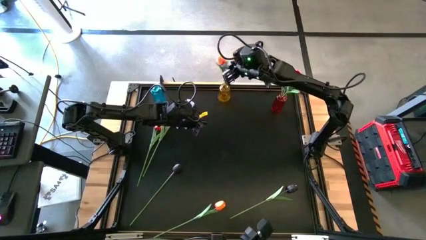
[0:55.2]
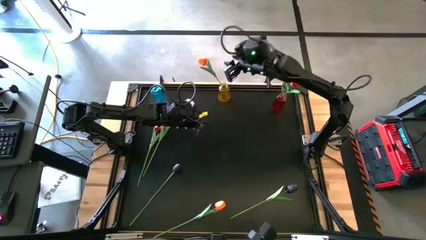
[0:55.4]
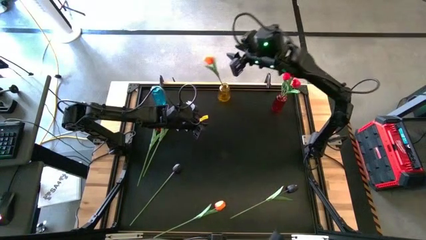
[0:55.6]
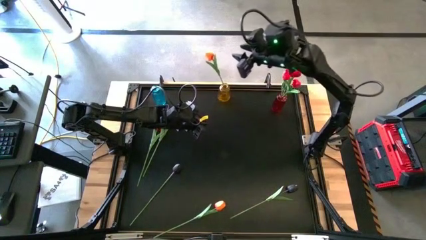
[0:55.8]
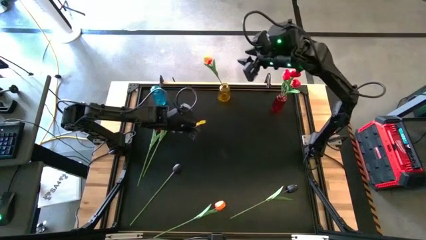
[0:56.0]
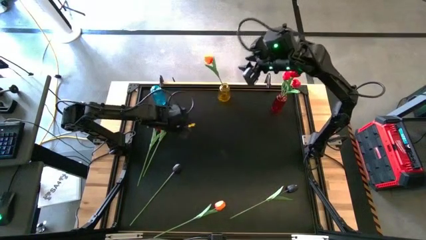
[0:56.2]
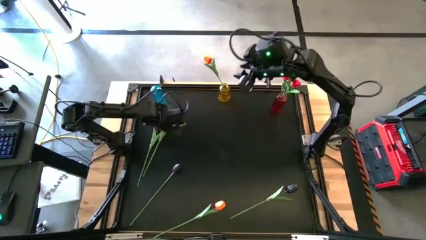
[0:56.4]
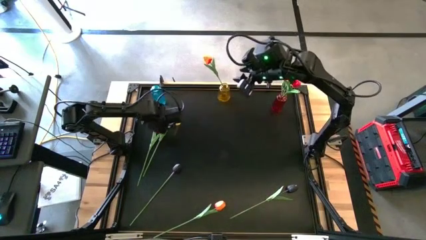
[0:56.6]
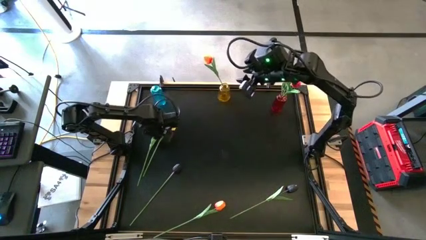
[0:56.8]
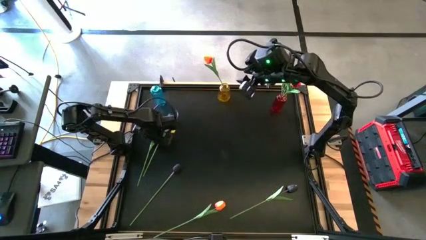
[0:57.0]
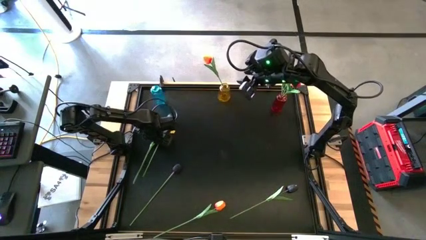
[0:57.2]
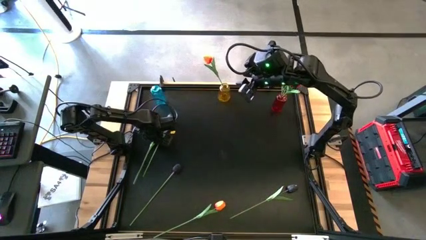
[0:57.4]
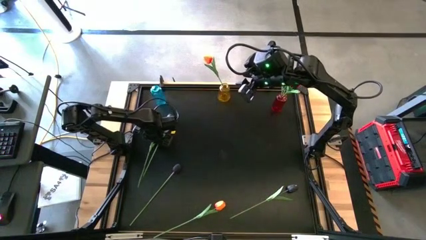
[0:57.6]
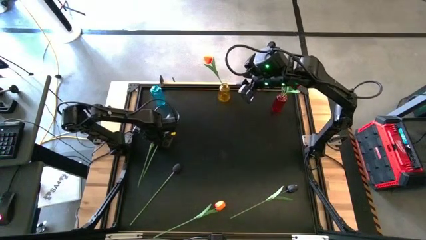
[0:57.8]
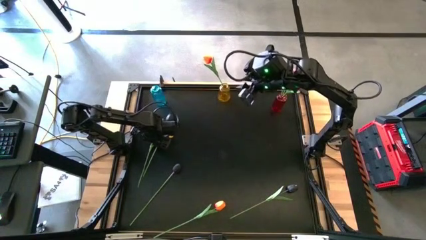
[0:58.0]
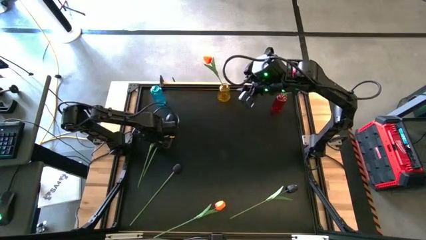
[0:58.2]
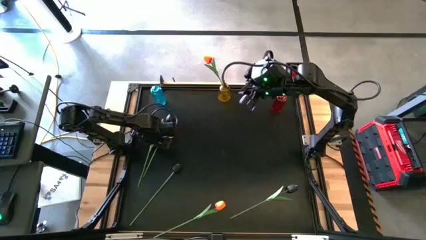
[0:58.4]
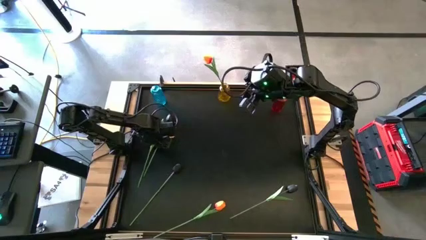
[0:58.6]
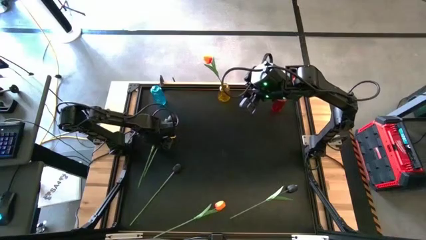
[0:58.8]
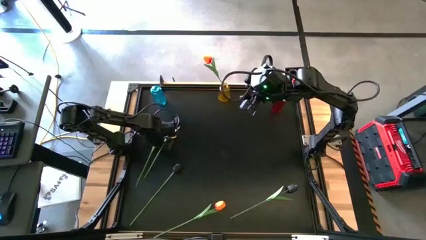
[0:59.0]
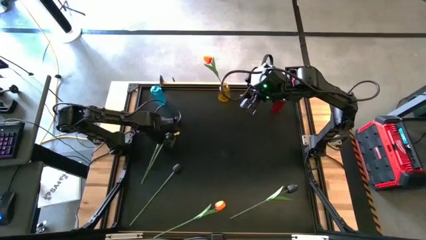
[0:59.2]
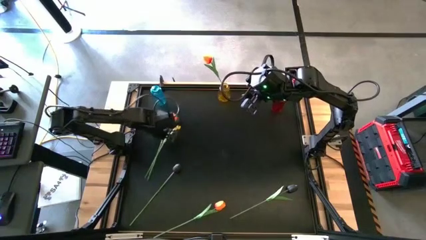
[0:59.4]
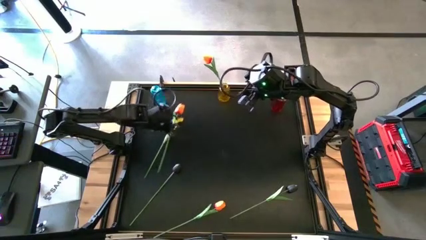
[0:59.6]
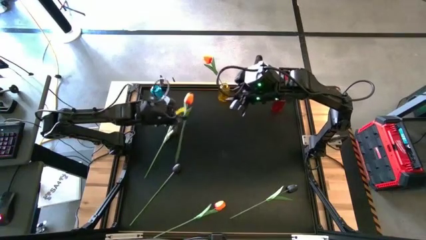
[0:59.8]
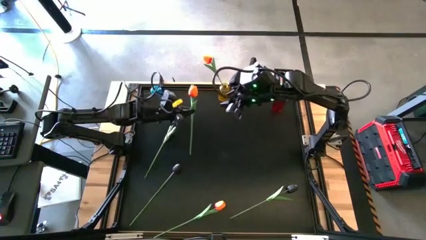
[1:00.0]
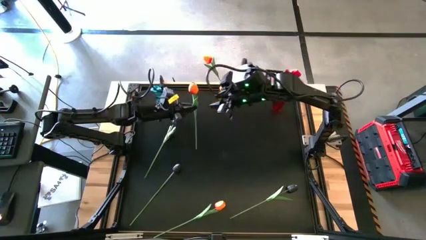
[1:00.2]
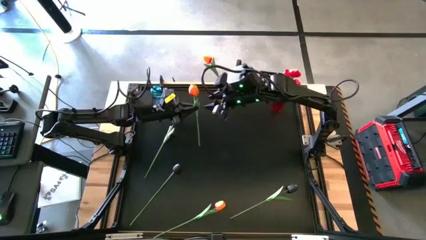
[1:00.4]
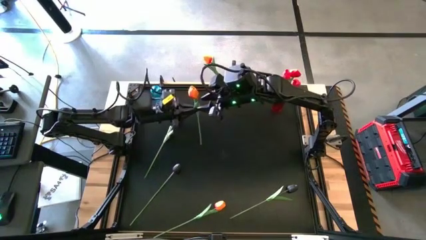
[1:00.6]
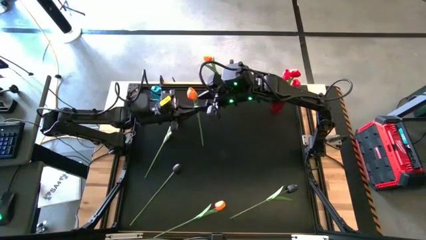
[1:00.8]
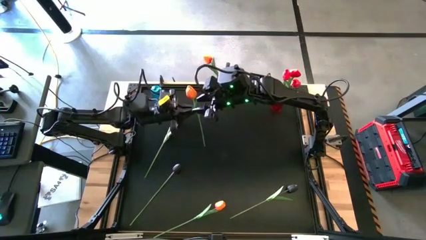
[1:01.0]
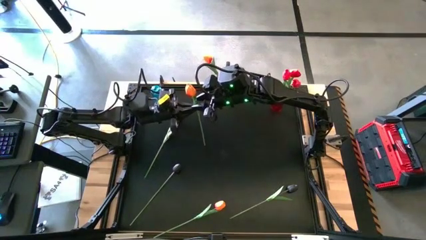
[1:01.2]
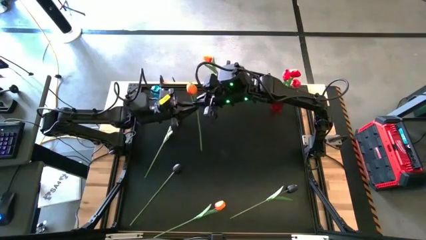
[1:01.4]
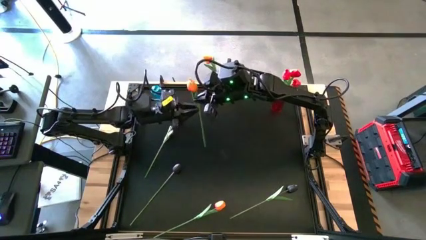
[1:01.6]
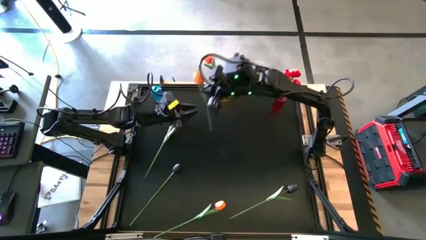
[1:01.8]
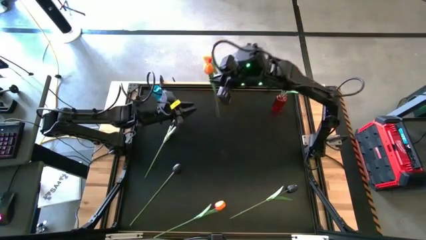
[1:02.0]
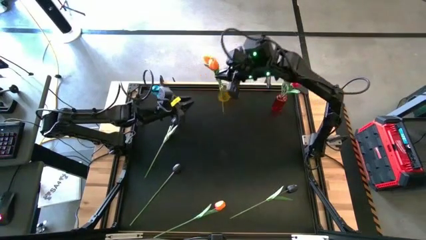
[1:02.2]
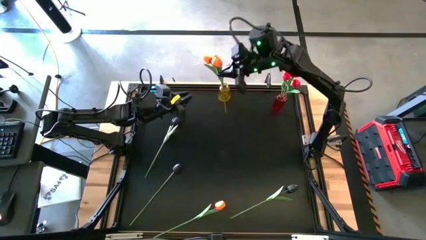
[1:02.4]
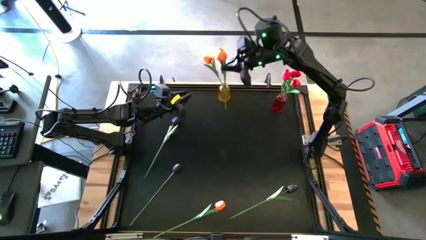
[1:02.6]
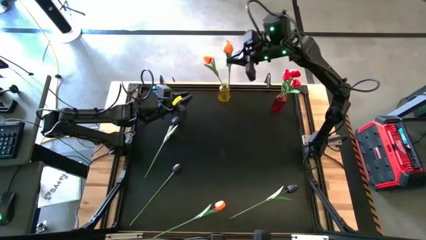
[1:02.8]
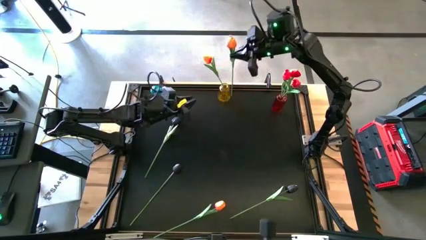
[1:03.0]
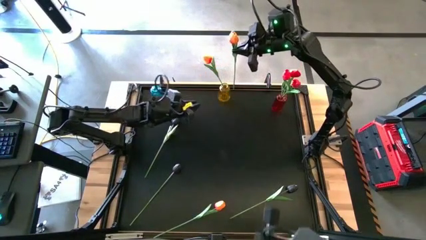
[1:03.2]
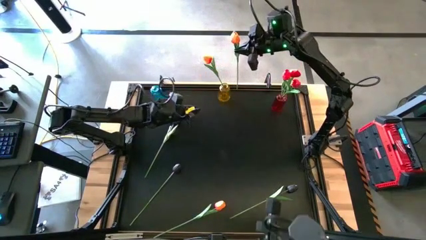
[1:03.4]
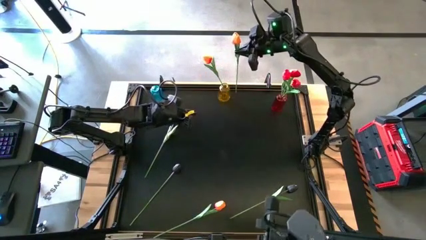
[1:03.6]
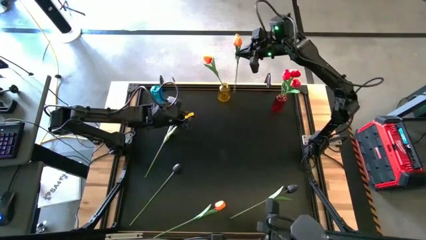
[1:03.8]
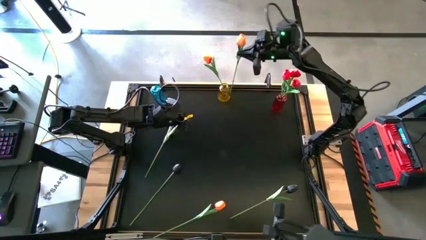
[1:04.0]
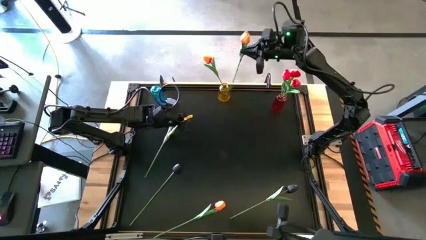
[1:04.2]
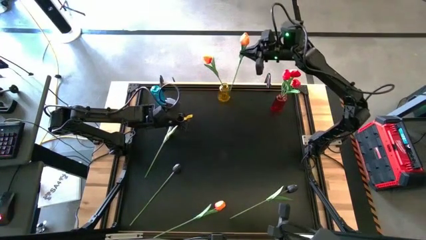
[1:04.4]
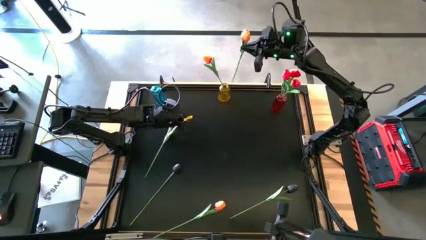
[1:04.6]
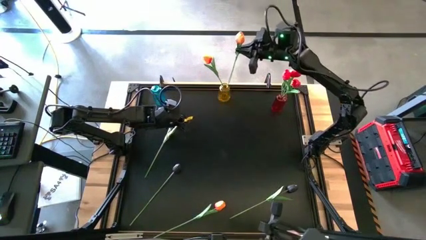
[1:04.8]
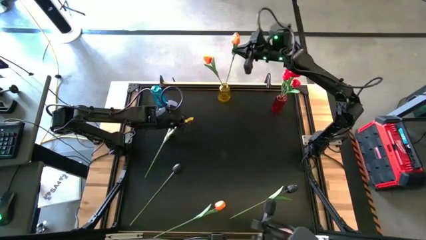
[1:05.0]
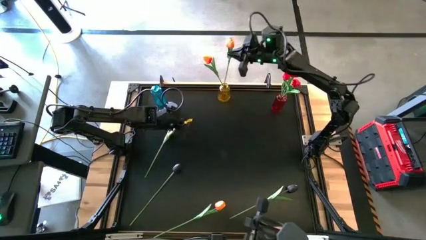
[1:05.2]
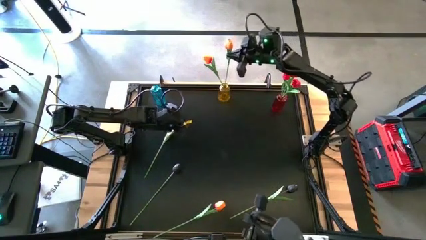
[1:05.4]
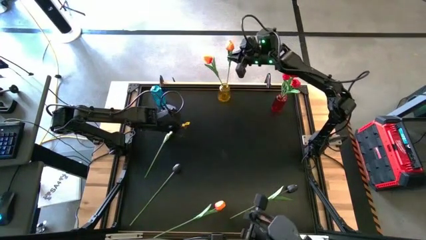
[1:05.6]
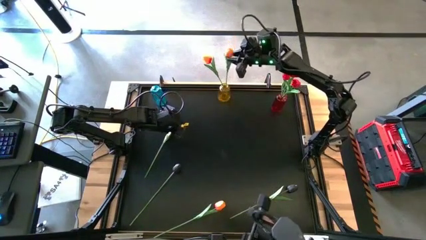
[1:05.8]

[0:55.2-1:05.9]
Task: Sort flowers into vase by color
Put the left orange flower into the yellow vase

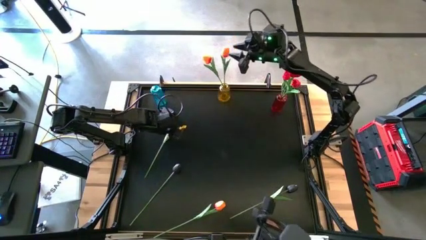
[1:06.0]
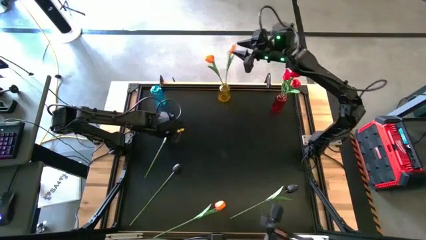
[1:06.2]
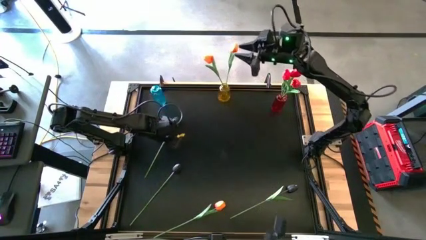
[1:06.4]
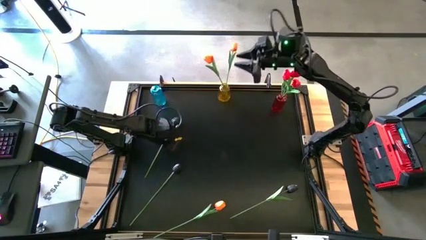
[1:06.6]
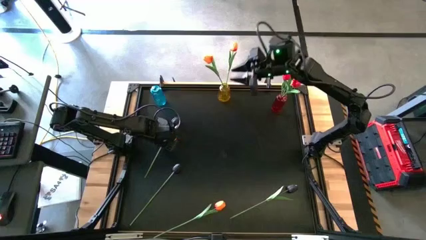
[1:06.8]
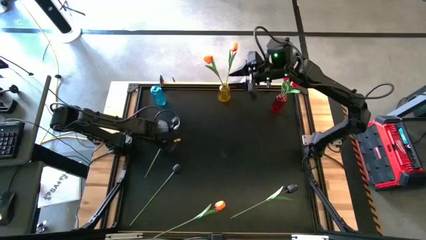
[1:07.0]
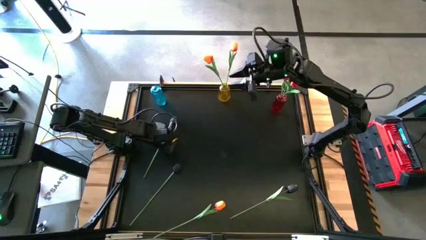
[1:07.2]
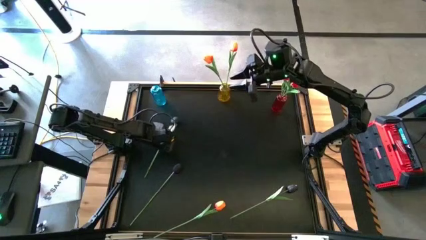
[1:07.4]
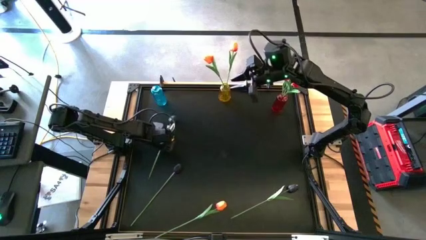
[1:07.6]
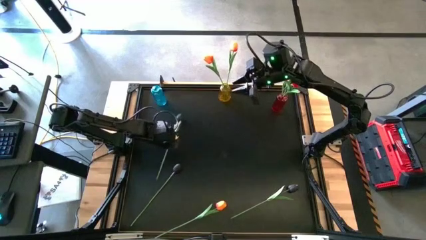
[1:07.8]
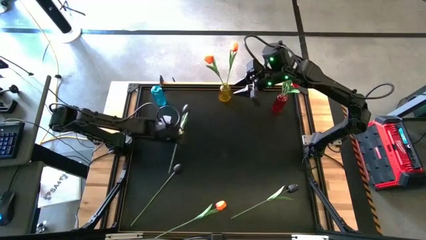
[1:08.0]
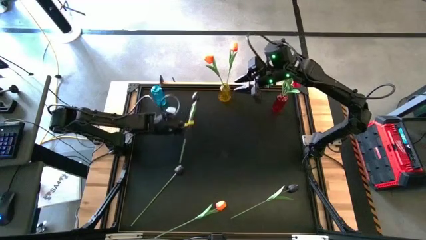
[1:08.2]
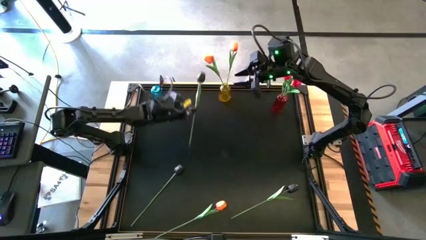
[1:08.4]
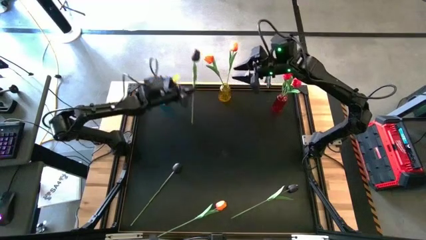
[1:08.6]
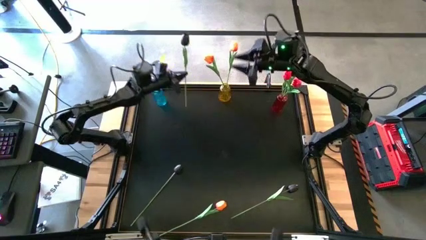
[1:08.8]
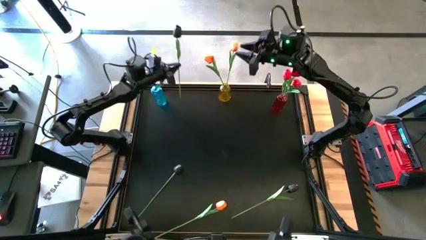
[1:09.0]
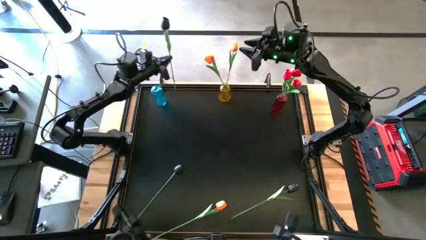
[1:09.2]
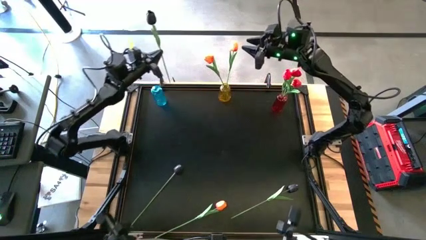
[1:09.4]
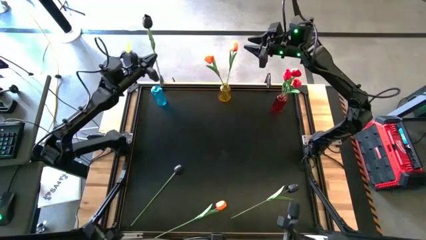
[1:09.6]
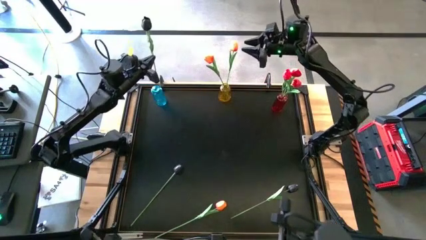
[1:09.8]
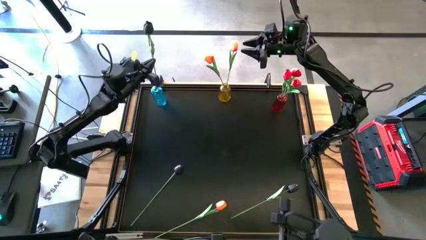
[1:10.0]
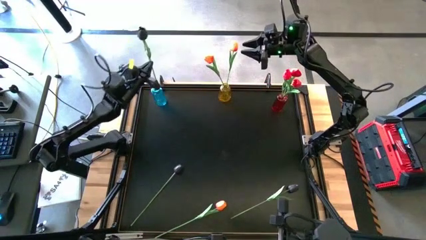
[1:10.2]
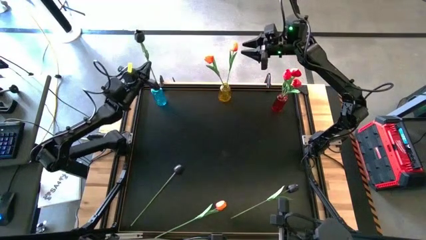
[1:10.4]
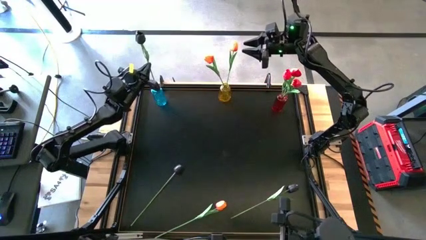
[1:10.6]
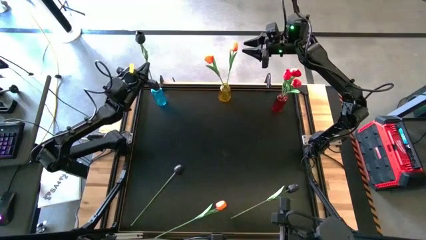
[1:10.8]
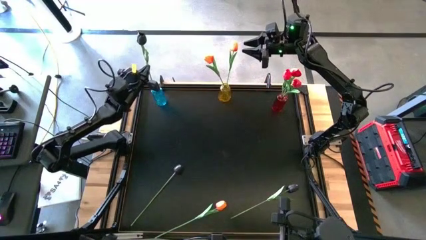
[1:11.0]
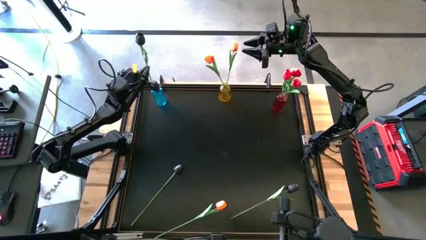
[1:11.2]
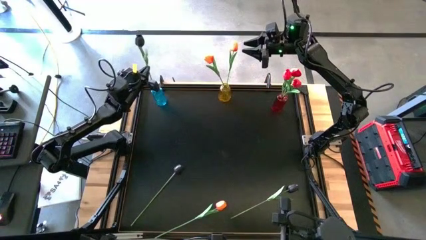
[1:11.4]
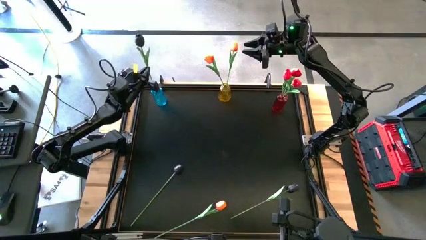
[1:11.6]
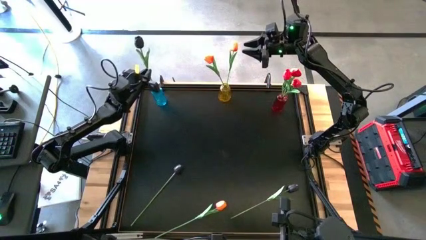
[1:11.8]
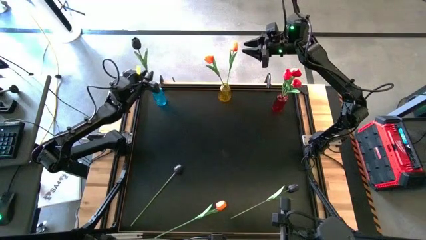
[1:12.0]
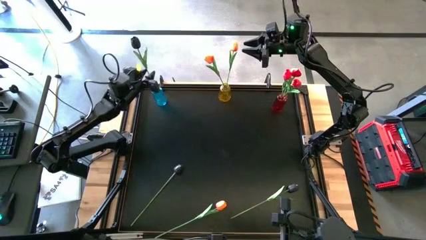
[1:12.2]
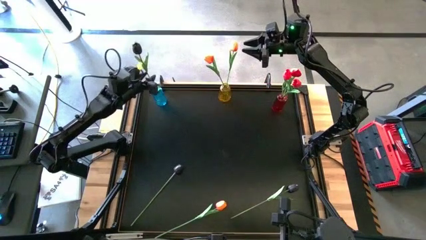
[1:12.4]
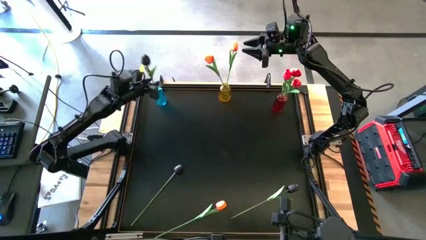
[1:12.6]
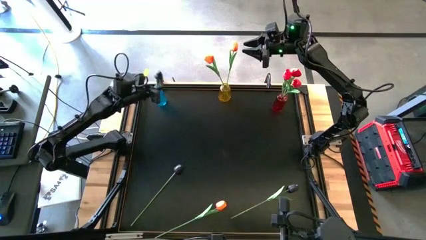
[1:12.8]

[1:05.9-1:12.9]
Put the top black flower into the blue vase
